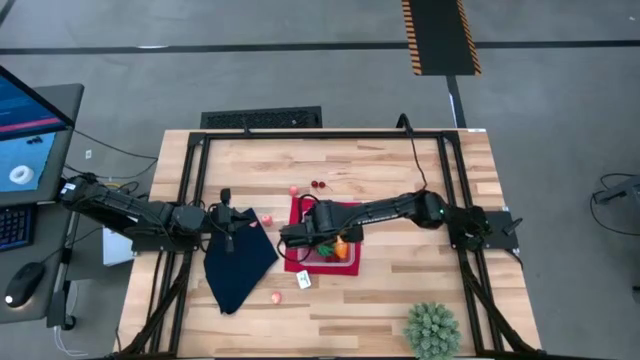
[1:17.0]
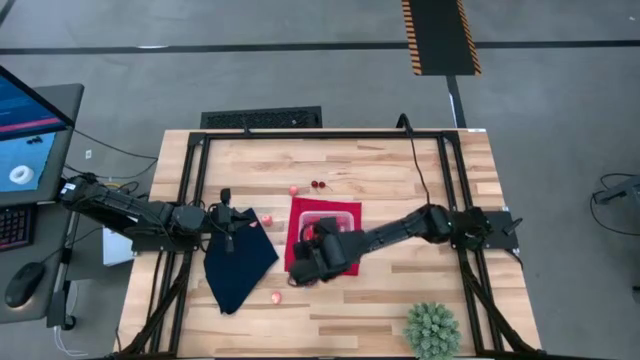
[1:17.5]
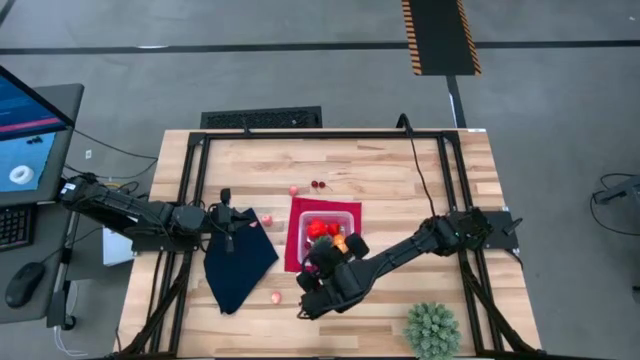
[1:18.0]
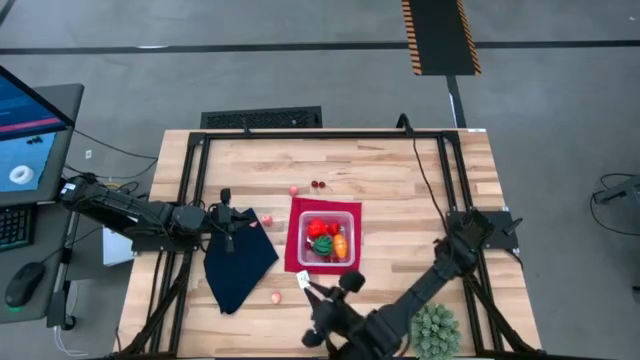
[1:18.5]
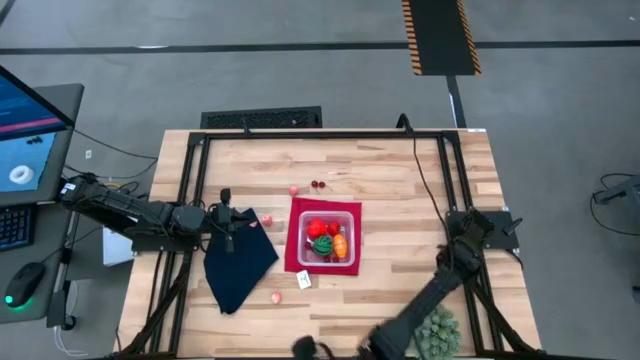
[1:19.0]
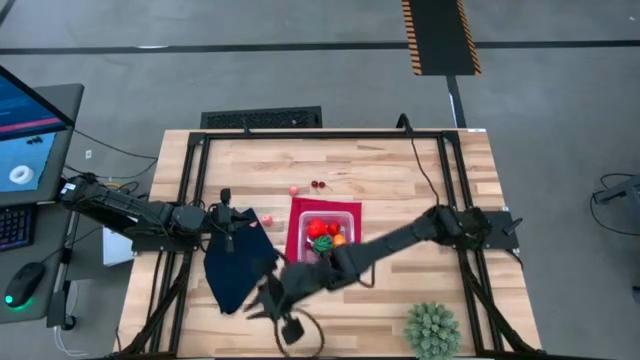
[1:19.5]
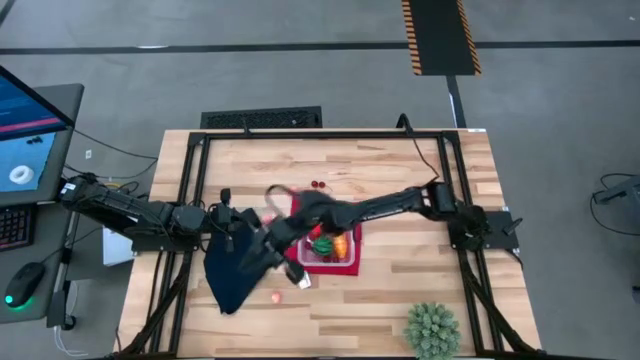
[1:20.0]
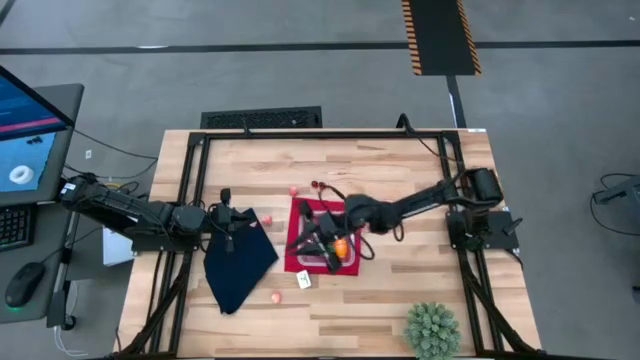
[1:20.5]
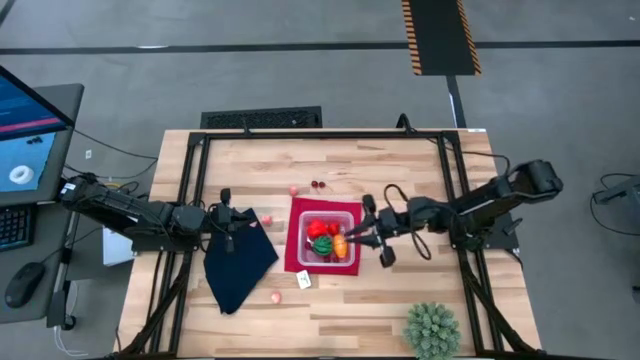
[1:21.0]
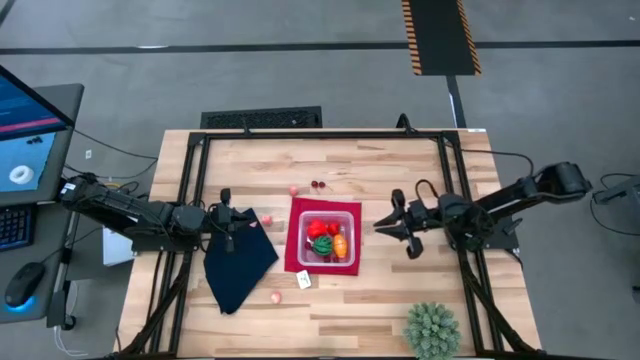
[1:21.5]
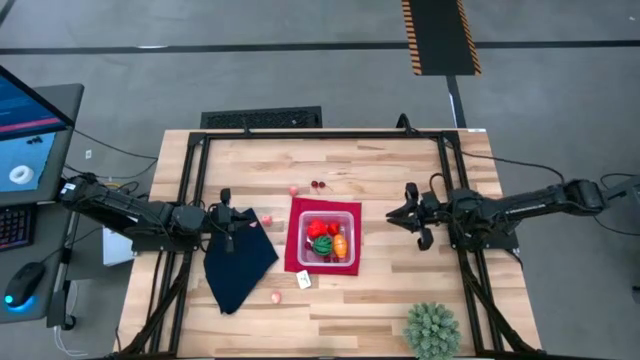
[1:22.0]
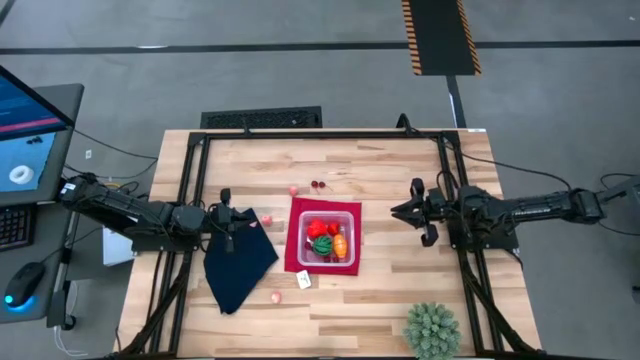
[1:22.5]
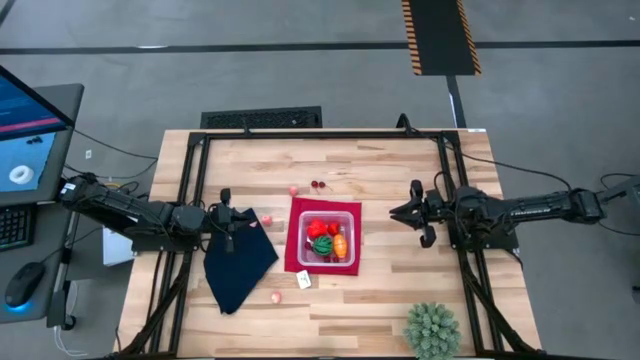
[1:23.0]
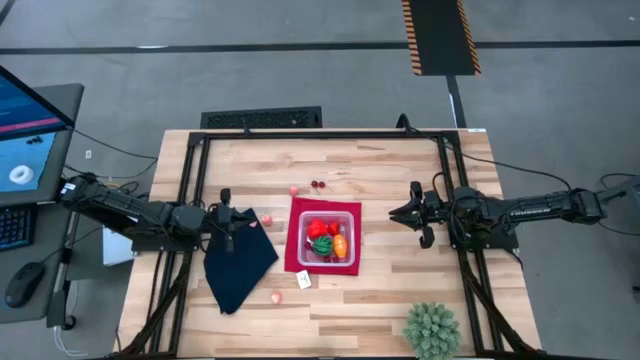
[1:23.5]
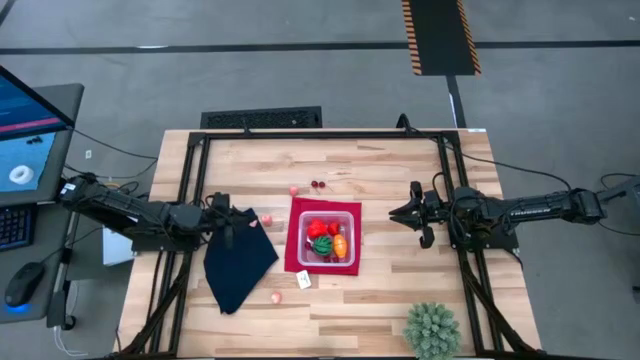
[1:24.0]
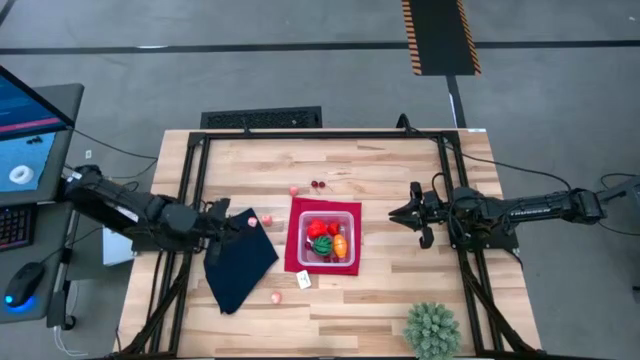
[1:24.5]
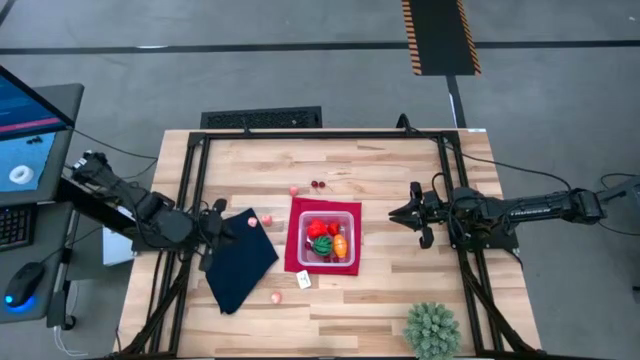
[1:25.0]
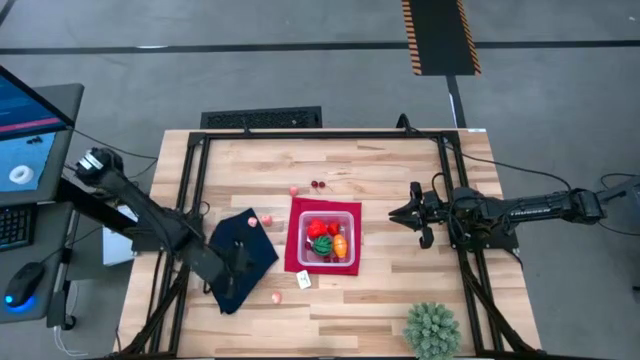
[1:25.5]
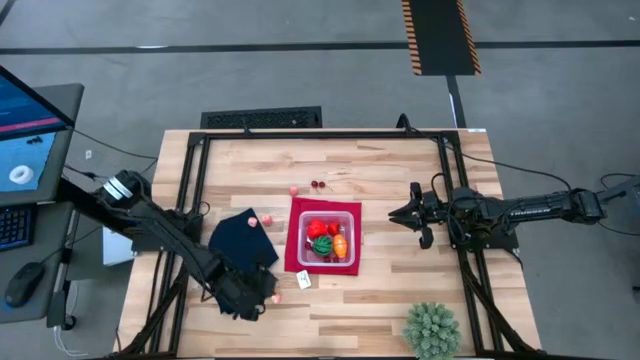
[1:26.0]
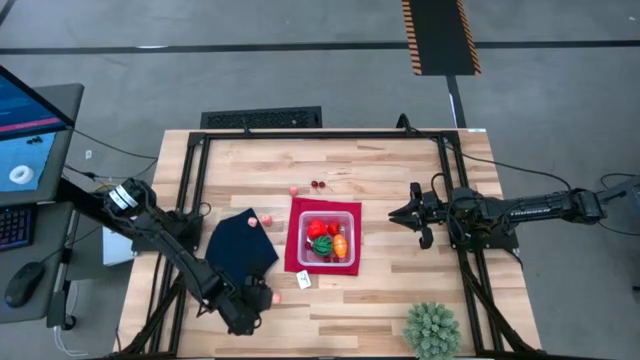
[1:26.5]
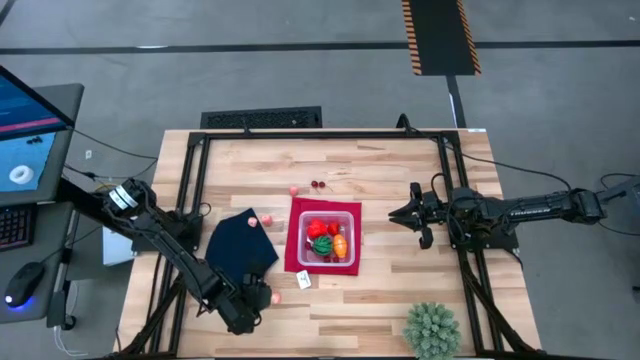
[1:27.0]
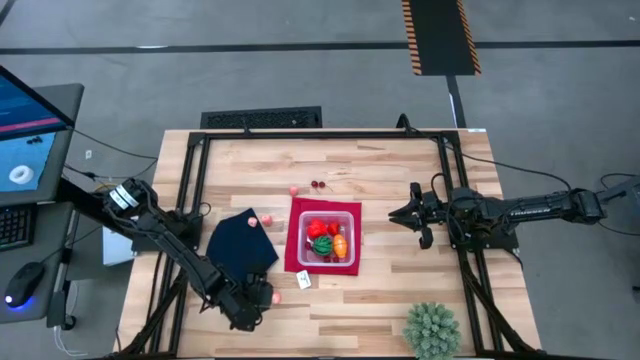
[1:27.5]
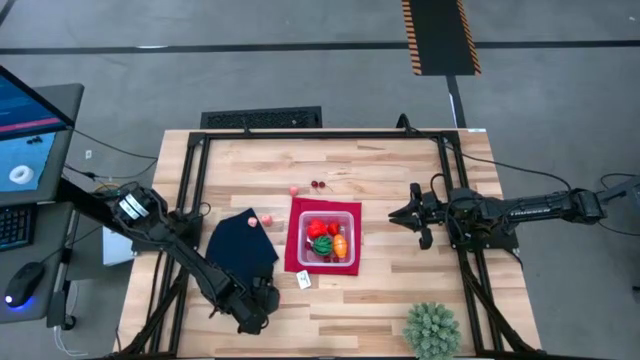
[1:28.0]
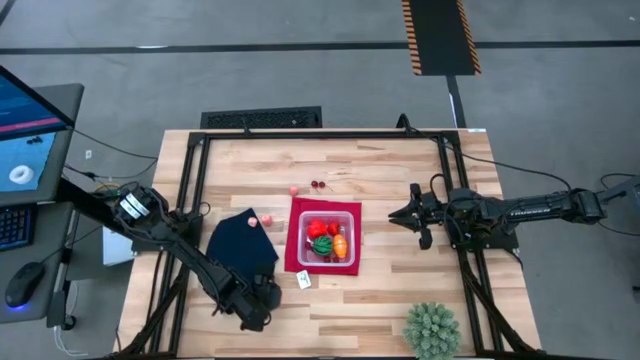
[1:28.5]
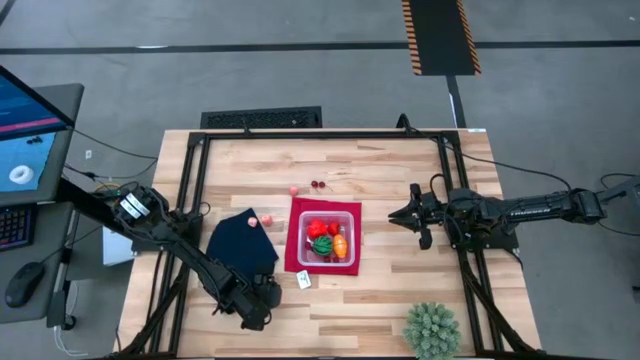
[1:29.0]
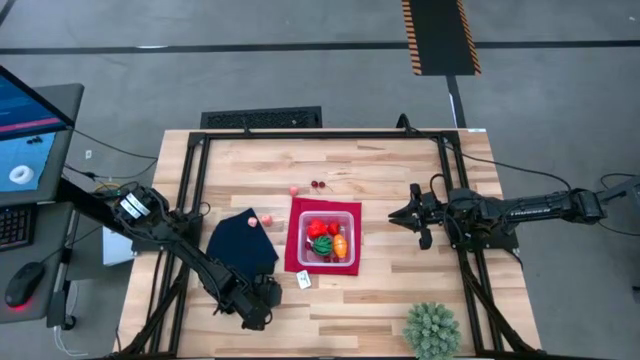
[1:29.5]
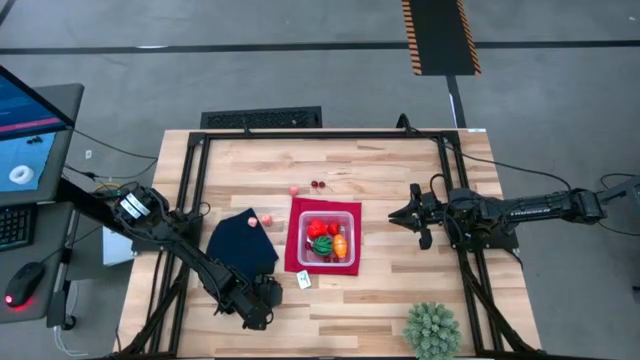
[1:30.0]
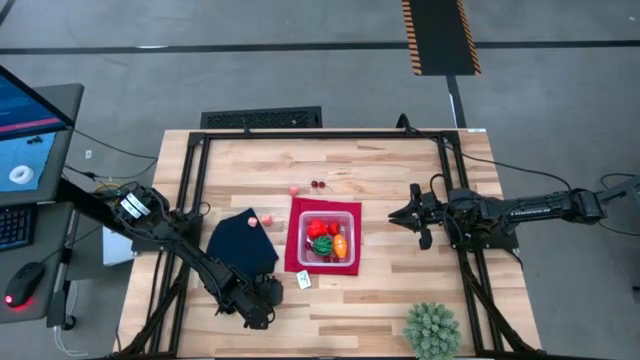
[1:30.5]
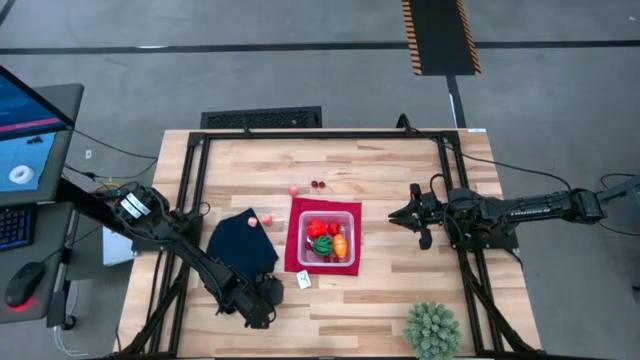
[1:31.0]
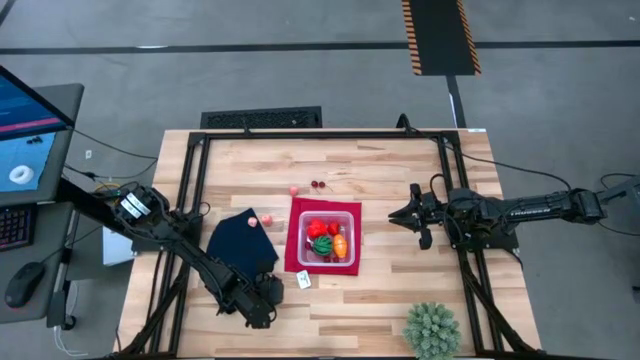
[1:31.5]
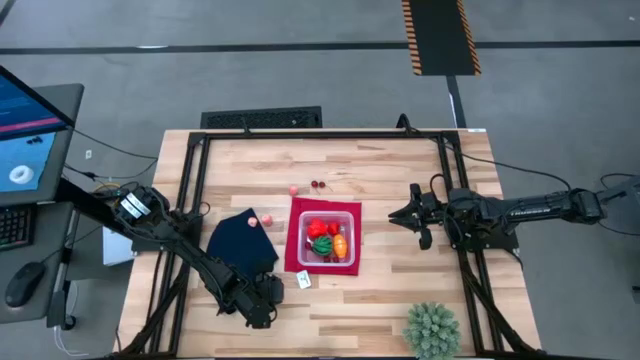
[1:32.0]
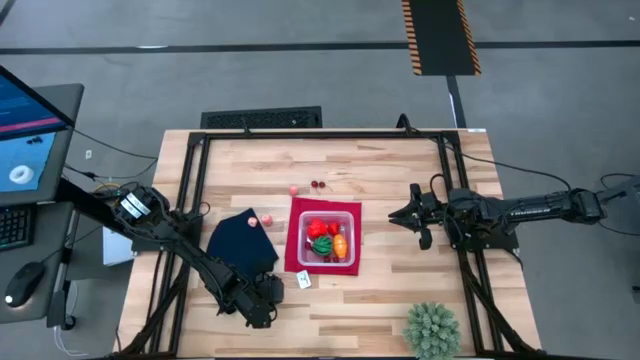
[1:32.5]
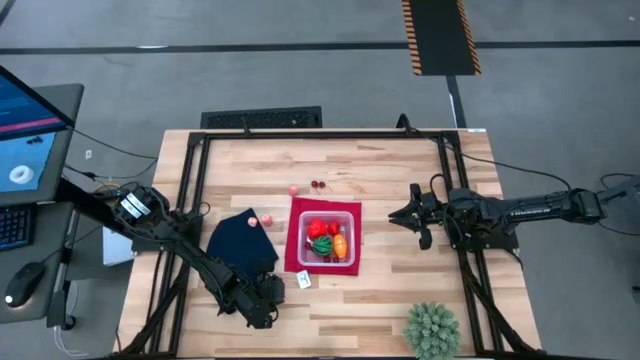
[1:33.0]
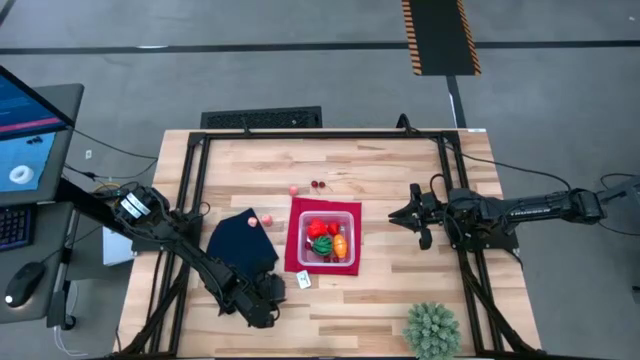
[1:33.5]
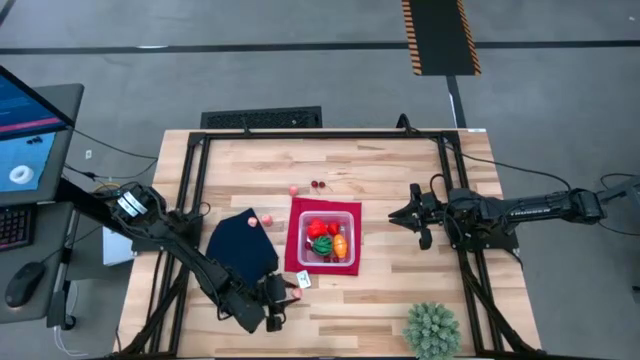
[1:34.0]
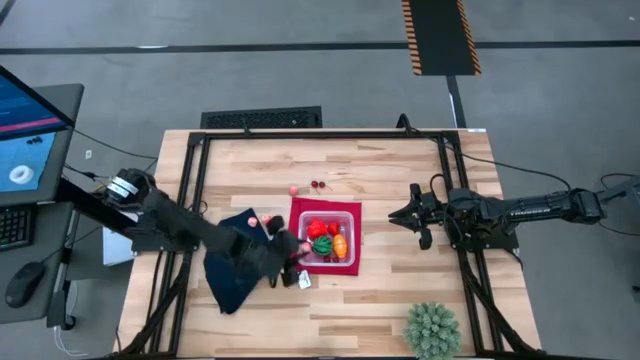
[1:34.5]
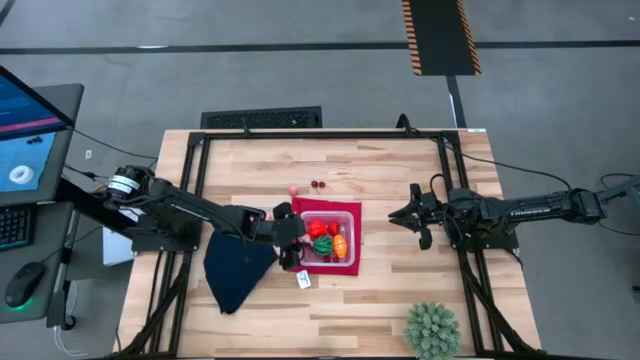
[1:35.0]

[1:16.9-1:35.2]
Task: Pick and placing Produce into tupperware
Put the peach in the transparent bin

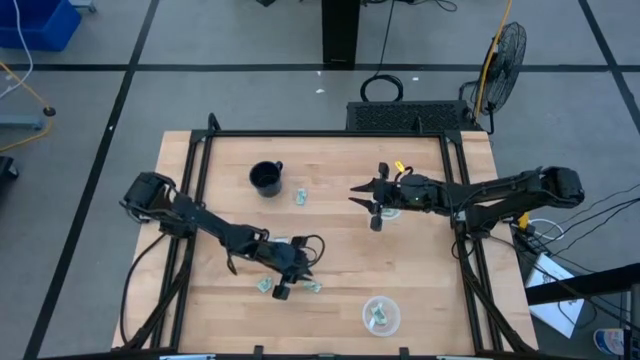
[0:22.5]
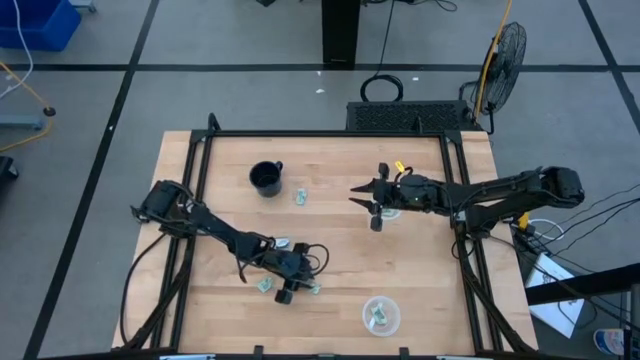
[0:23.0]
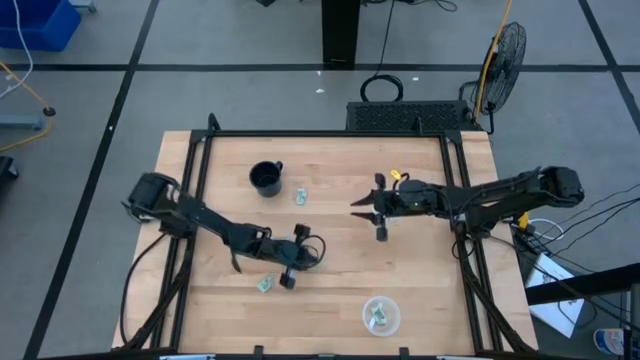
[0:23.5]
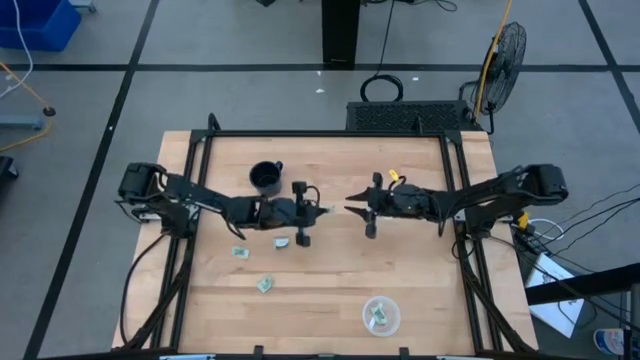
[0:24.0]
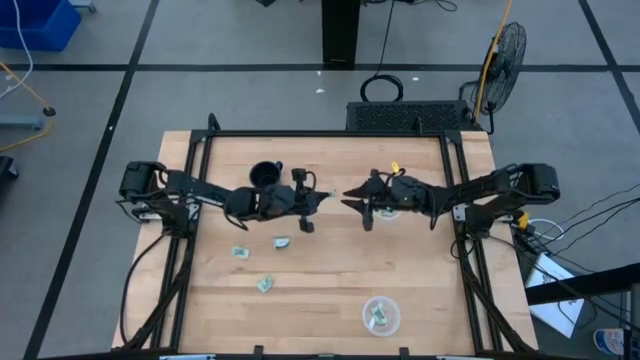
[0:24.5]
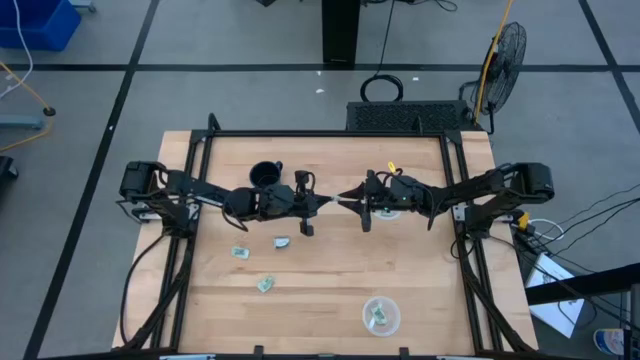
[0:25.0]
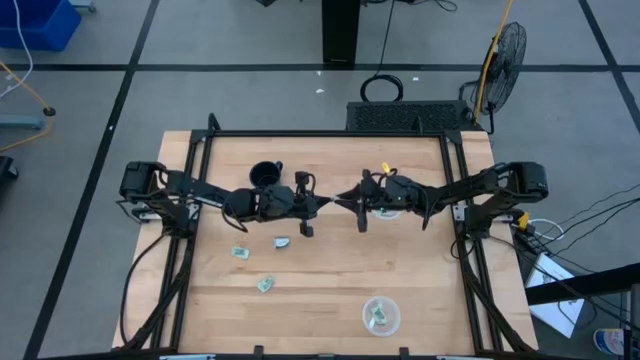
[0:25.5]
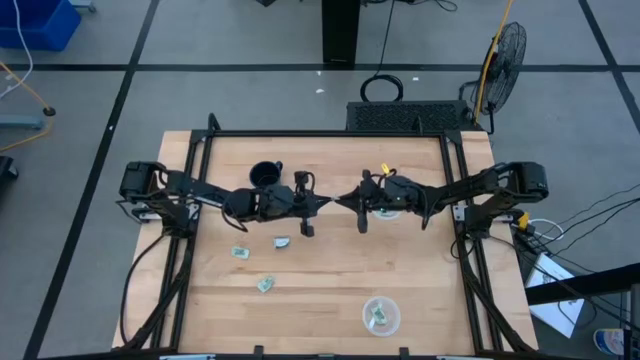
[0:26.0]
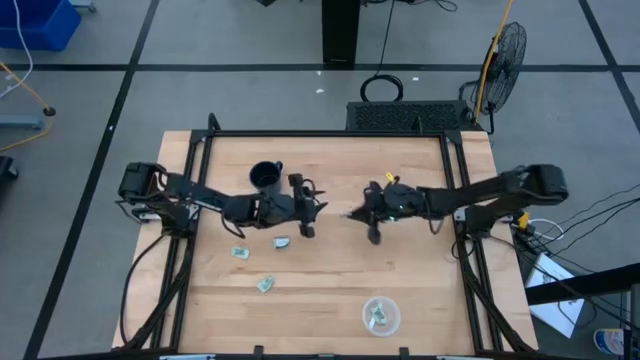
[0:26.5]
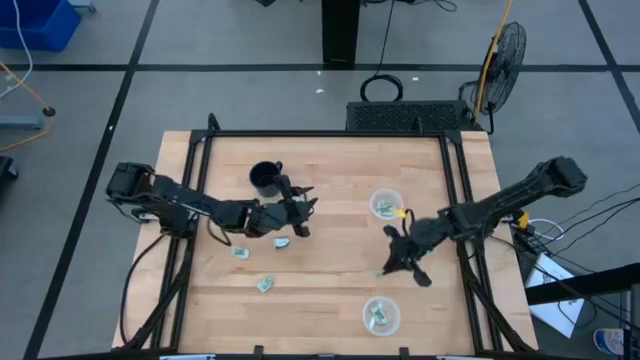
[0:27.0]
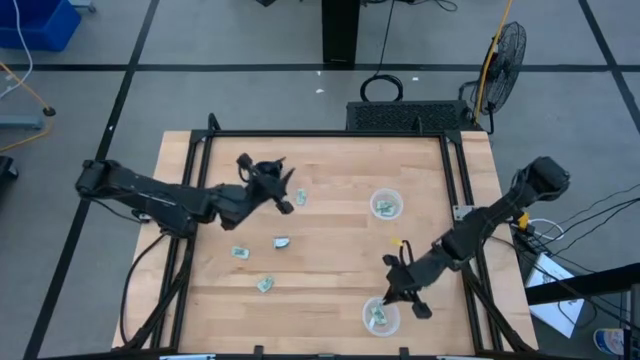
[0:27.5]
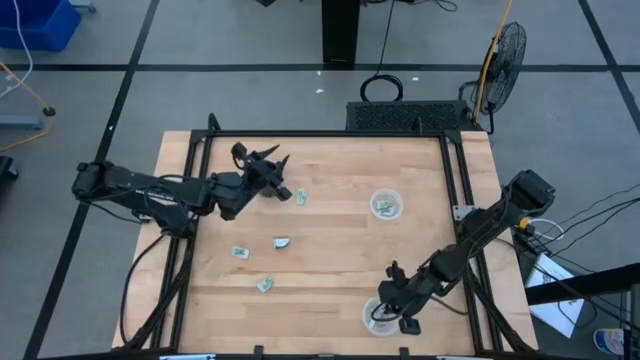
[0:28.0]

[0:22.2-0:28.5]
Task: Pick and place Stevia / Truvia into bins
Put the light green stevia packet into the bottom transparent container
